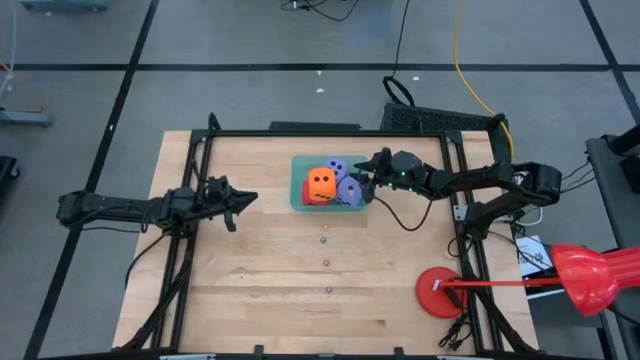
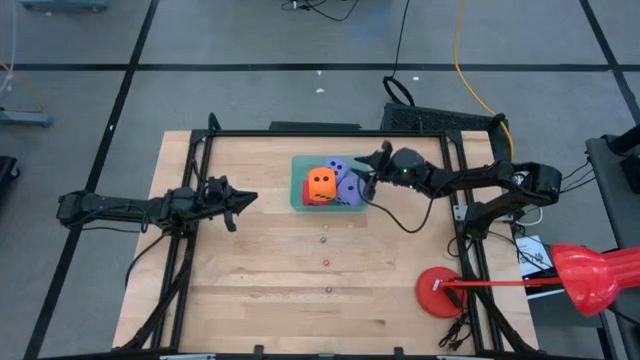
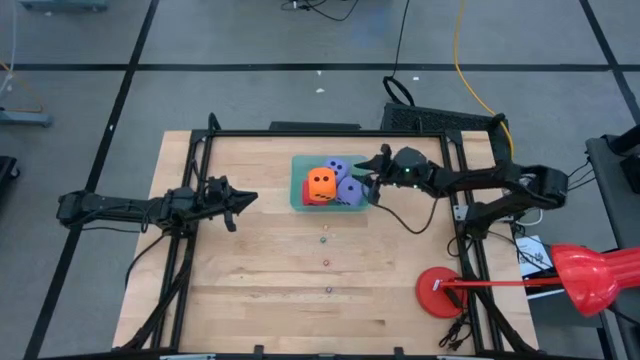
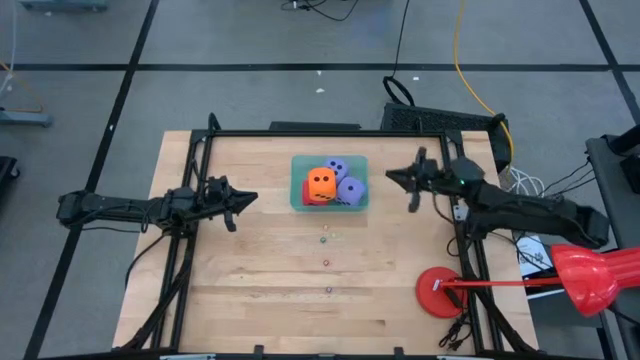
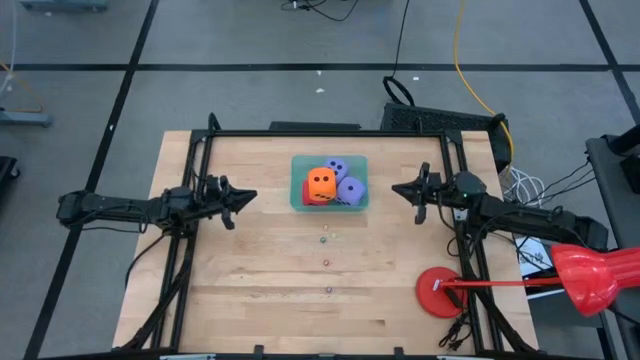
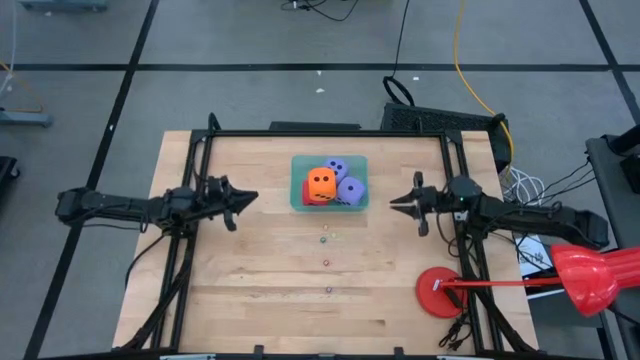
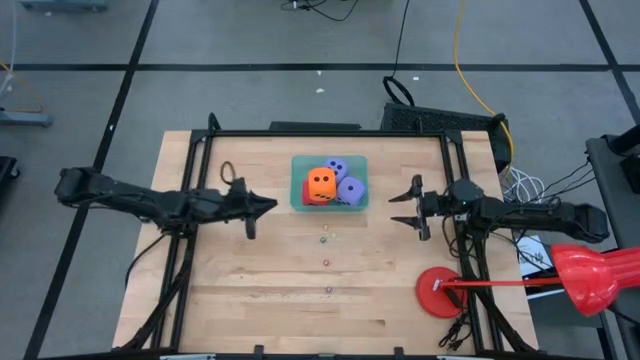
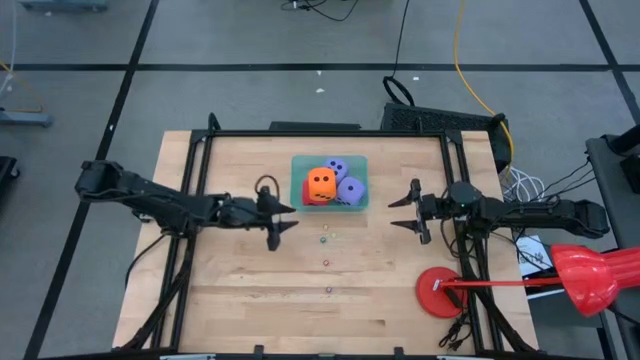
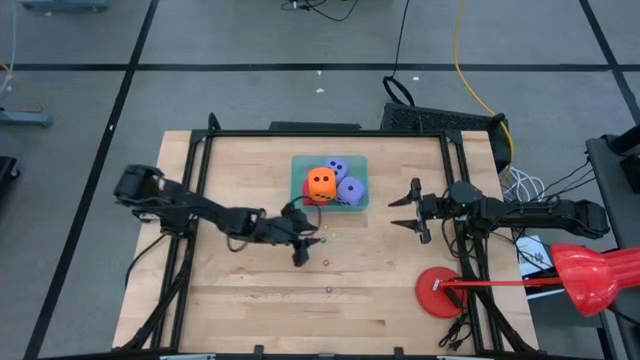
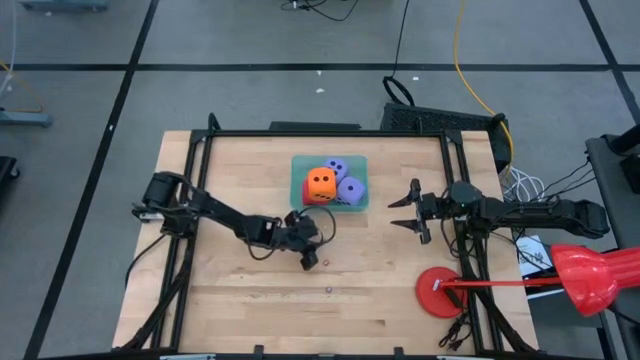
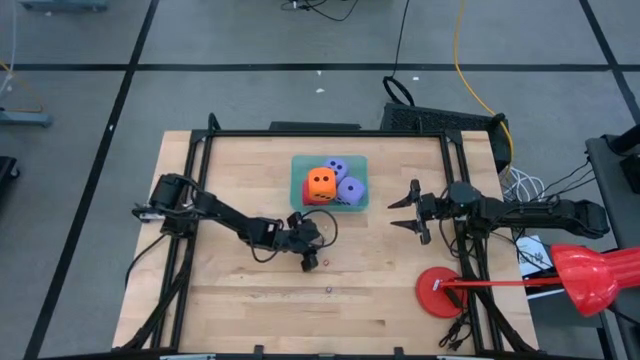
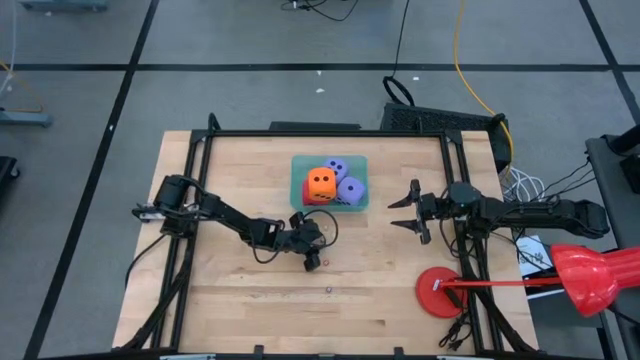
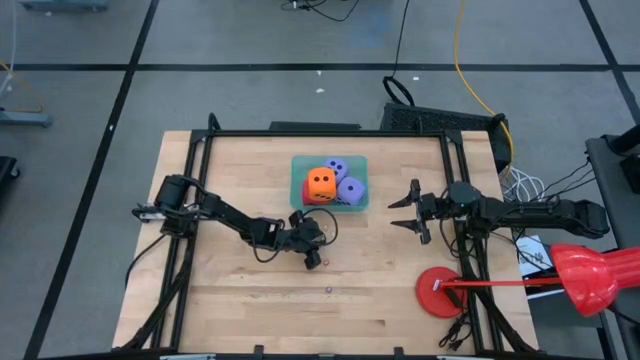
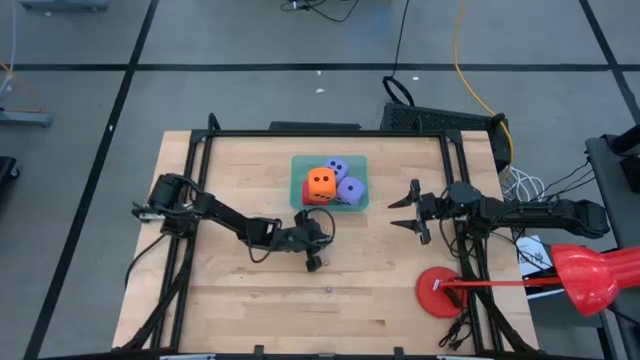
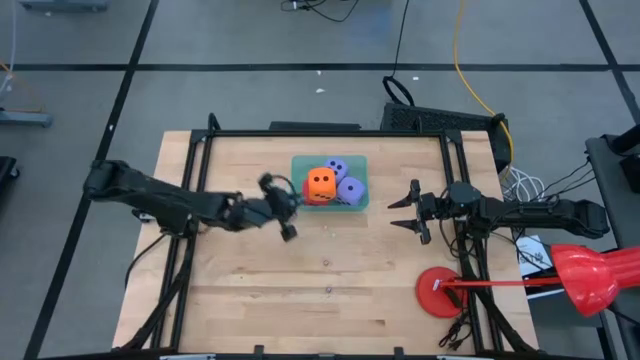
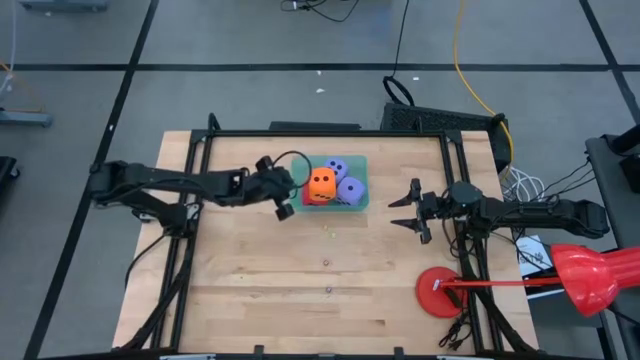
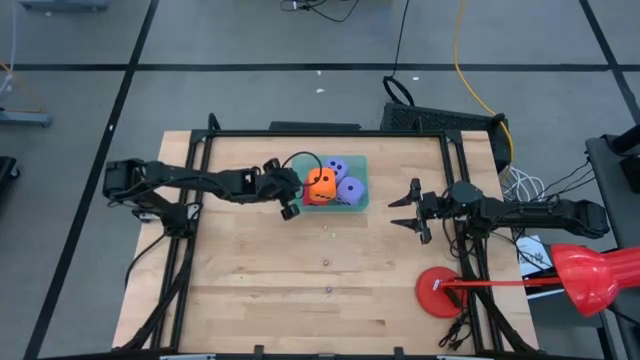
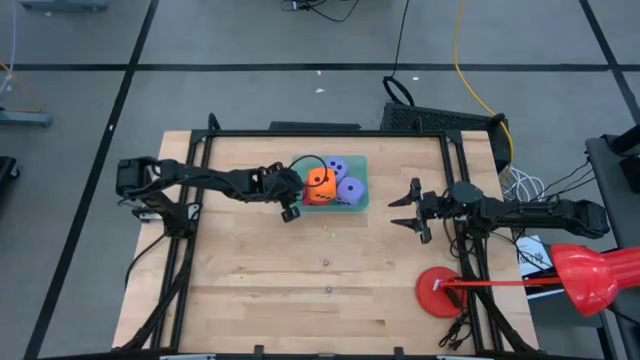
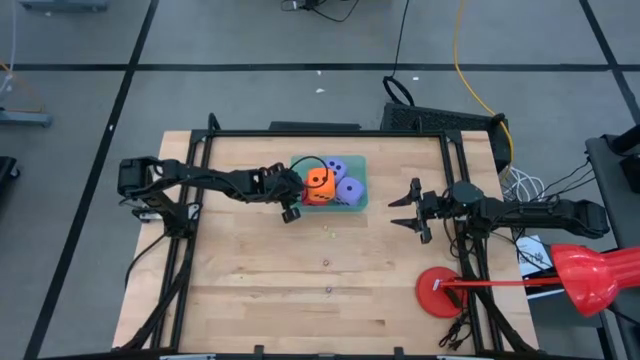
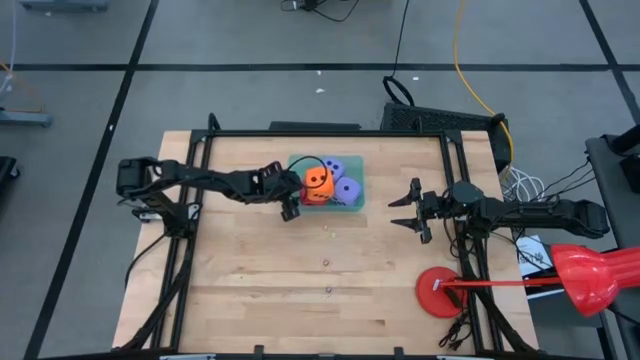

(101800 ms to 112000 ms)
Task: Pick & Place Dice
Put the small green dice into the blue bin

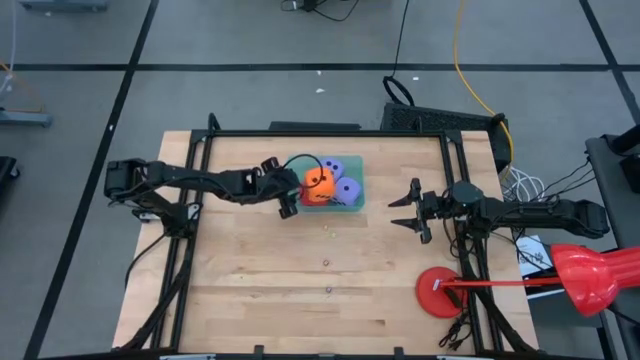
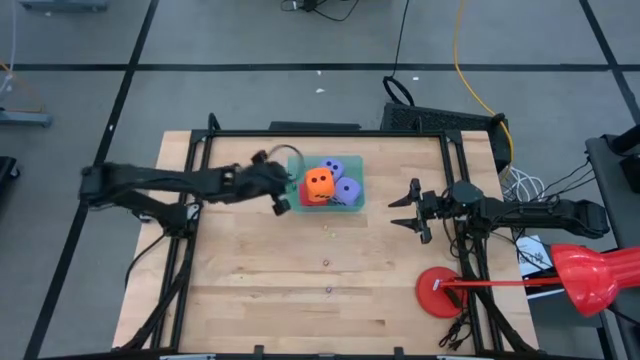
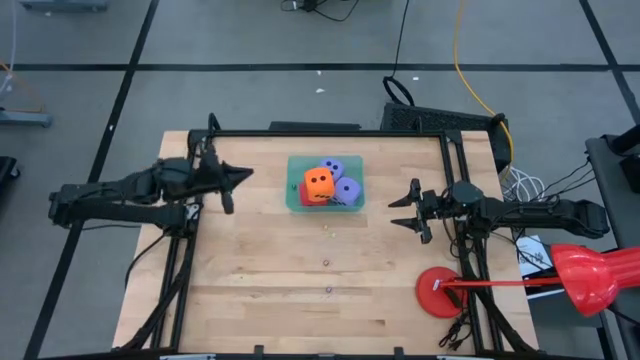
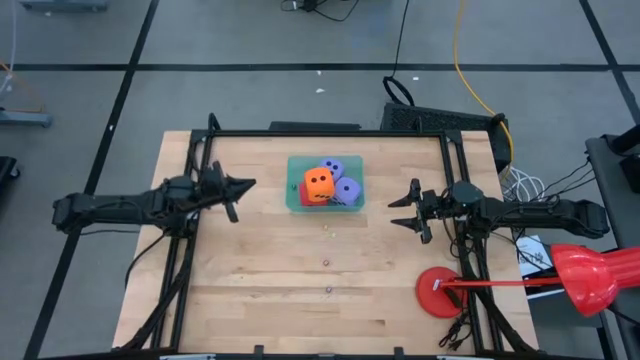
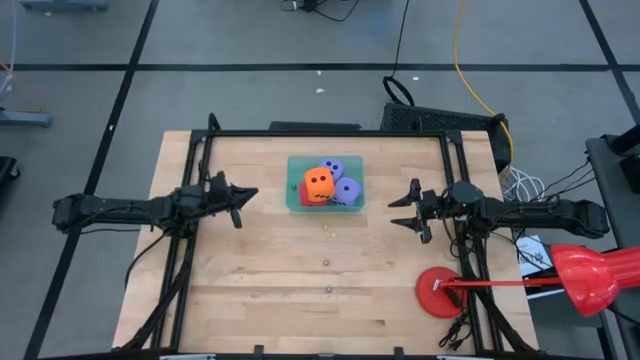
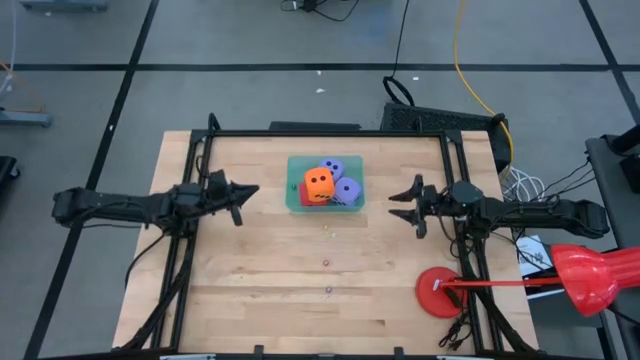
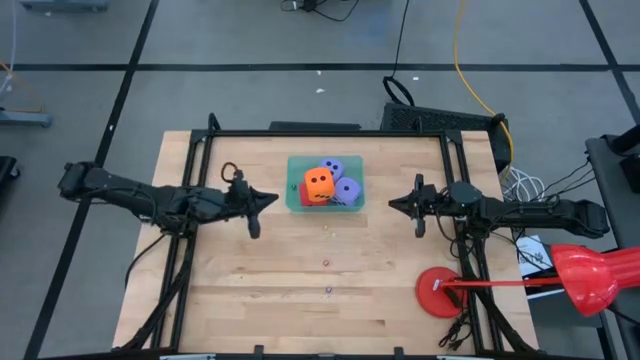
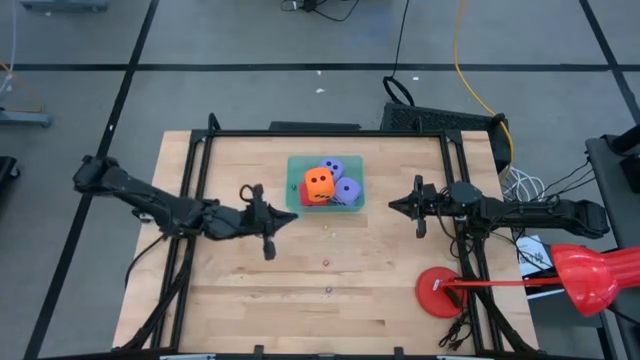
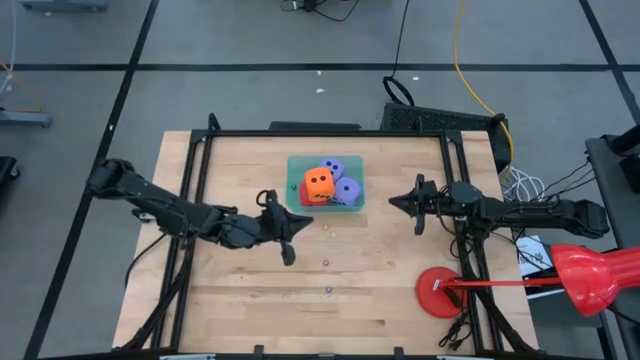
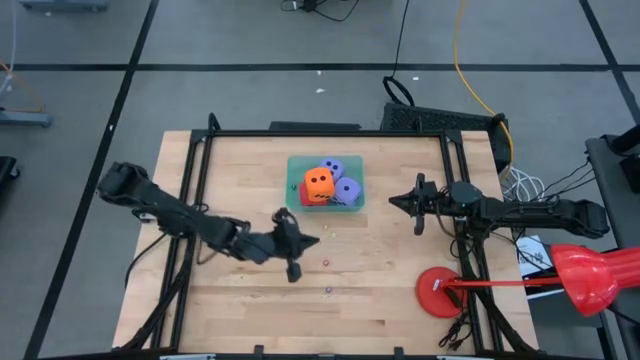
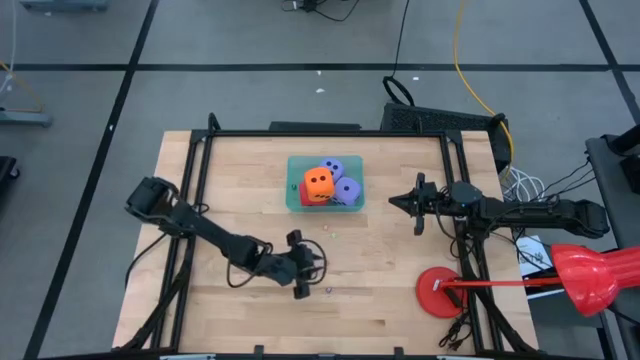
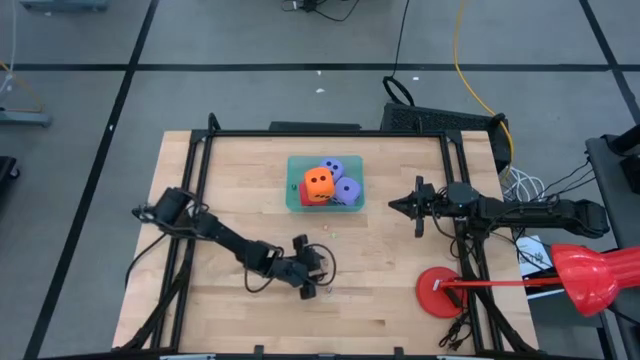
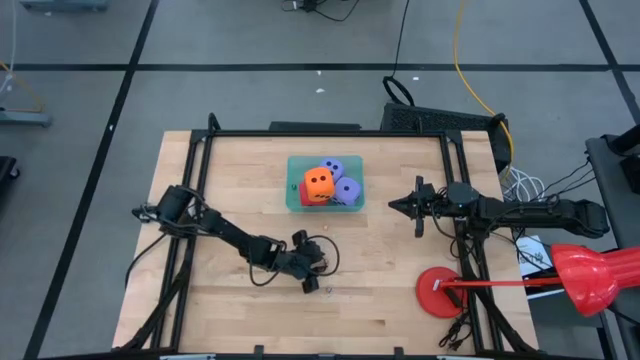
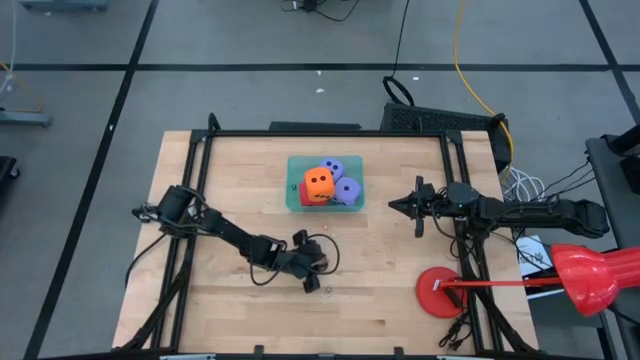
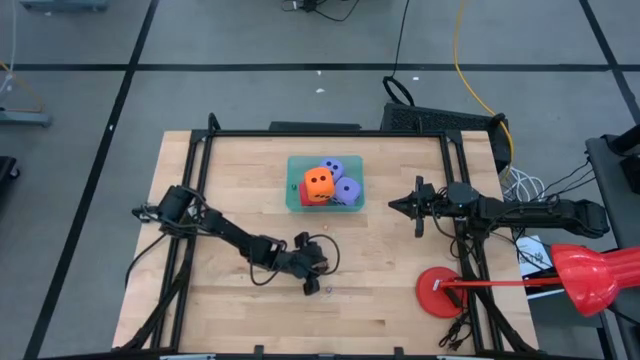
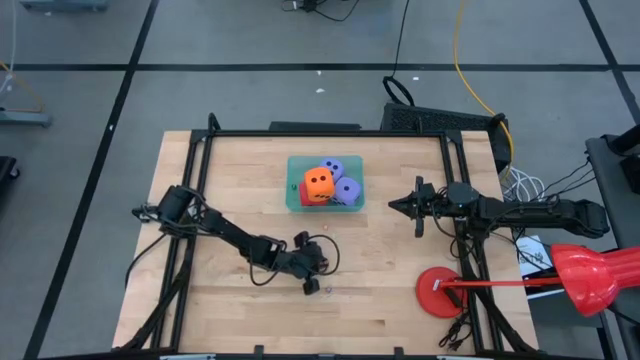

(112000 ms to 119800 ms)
Put the small red dice into the blue bin

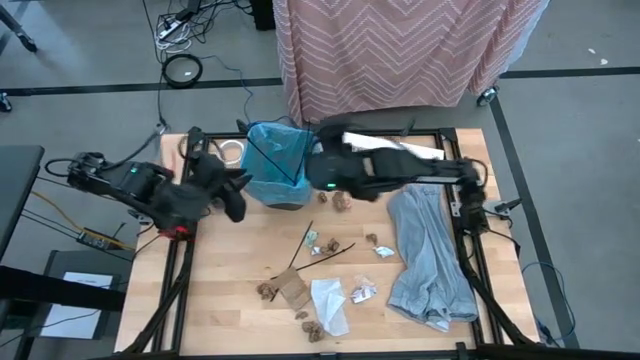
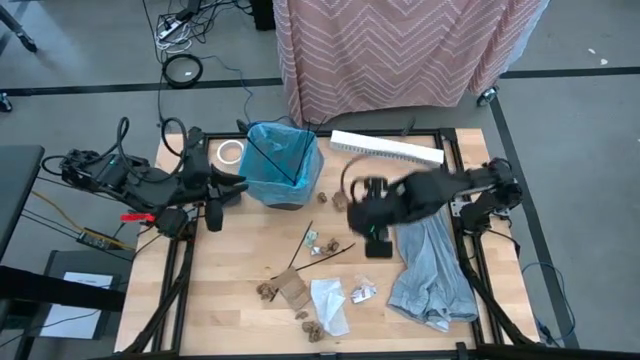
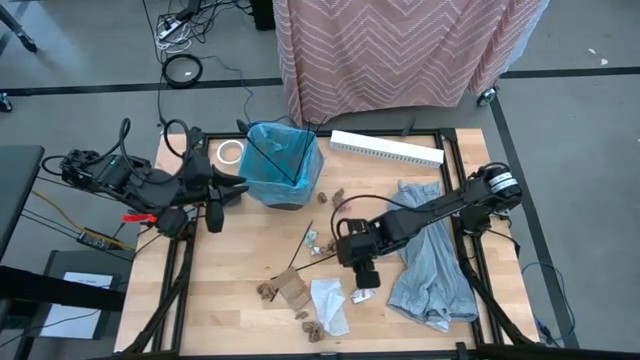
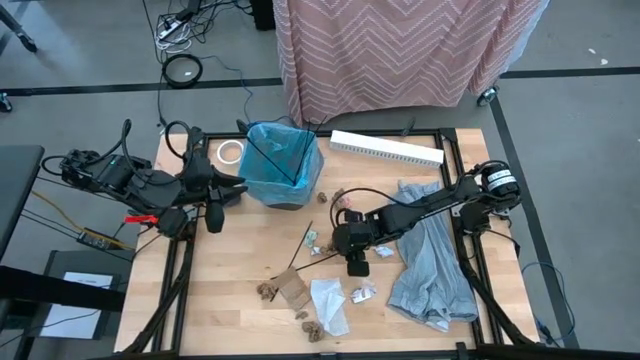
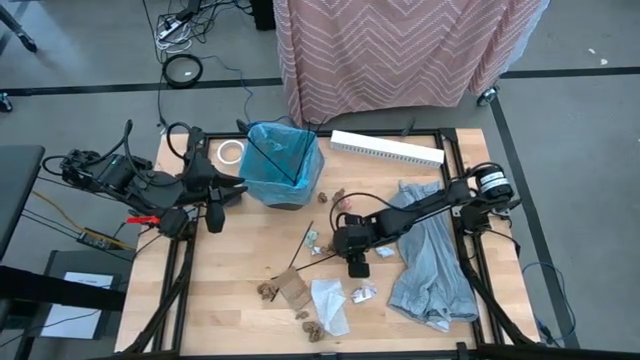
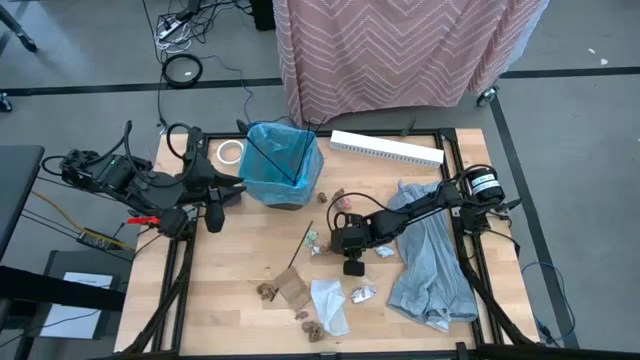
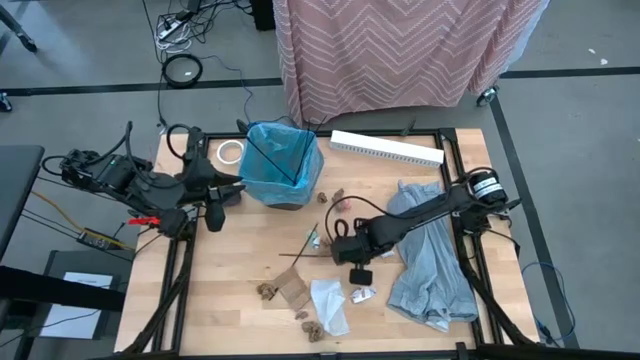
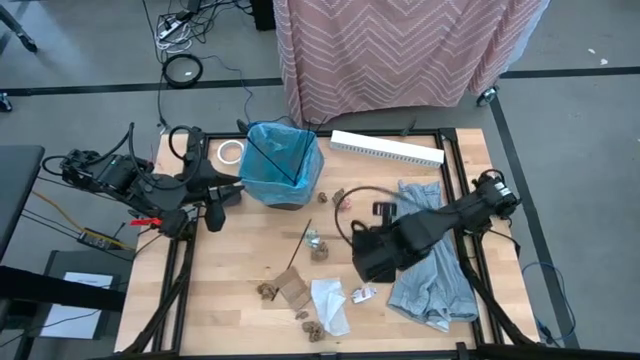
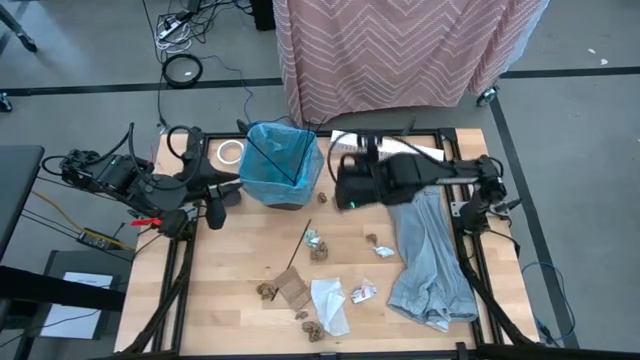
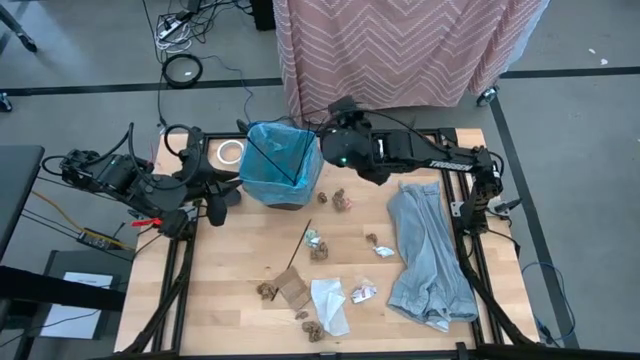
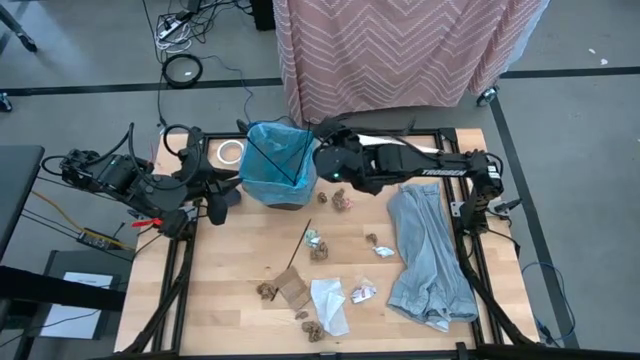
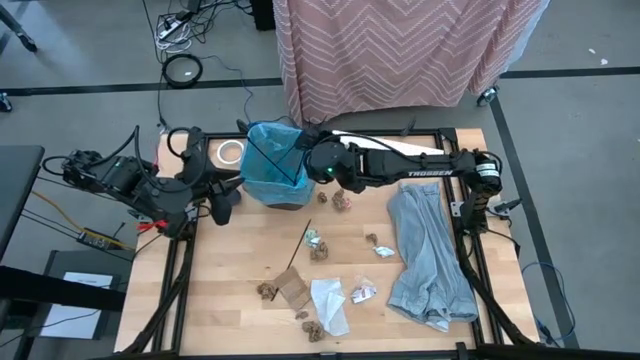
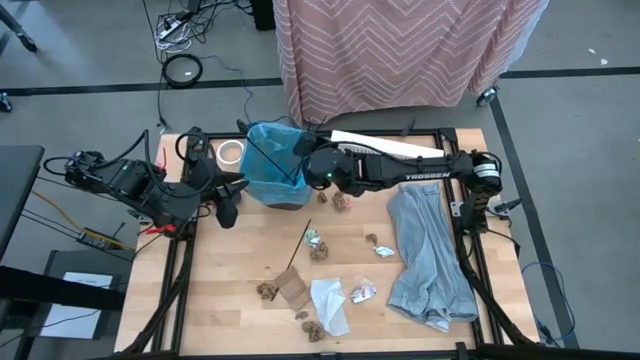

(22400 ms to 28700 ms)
Task: place trash/remove bag and relplace
Put the black zip tie into the black trash bin
